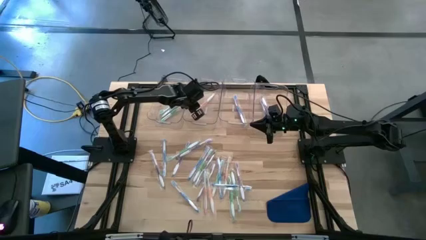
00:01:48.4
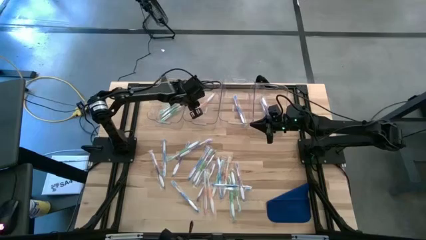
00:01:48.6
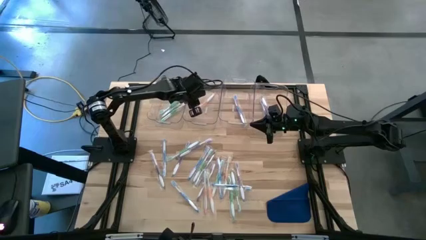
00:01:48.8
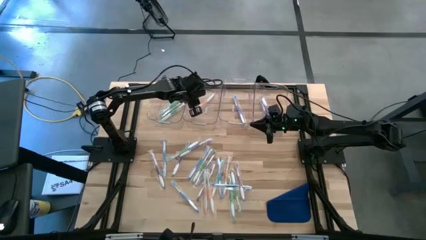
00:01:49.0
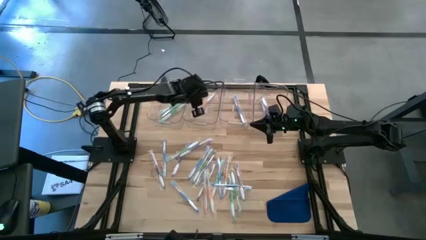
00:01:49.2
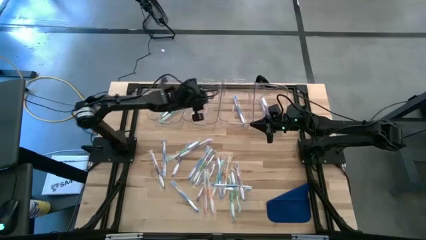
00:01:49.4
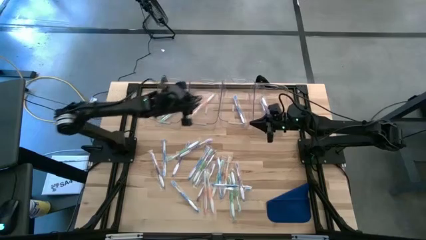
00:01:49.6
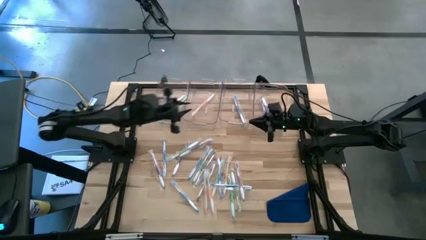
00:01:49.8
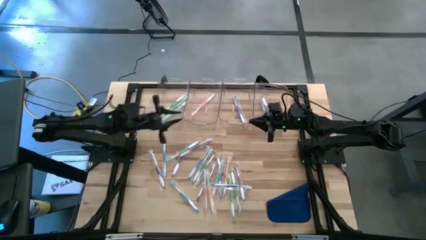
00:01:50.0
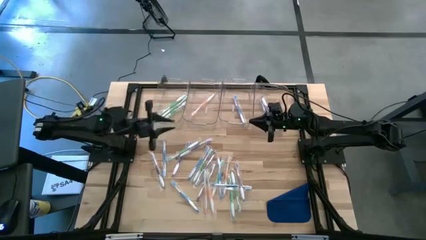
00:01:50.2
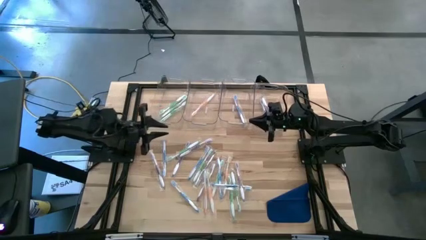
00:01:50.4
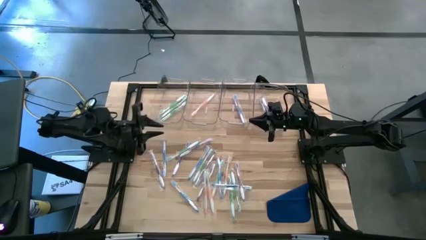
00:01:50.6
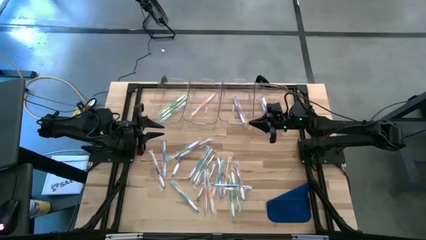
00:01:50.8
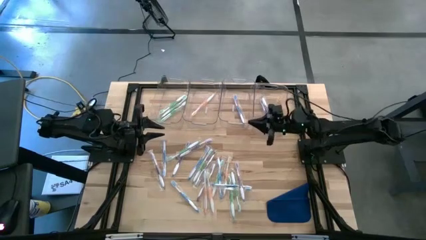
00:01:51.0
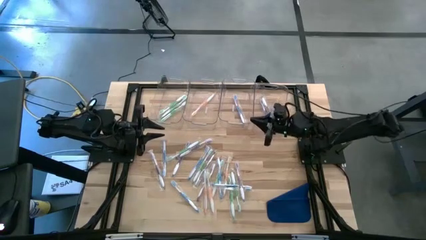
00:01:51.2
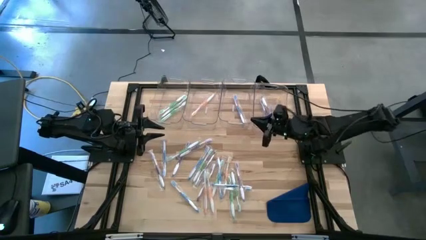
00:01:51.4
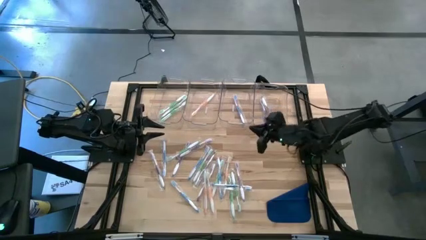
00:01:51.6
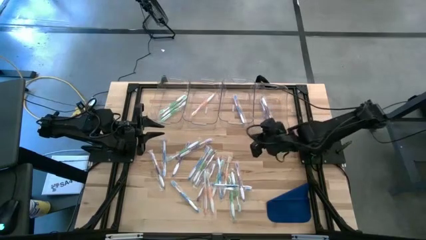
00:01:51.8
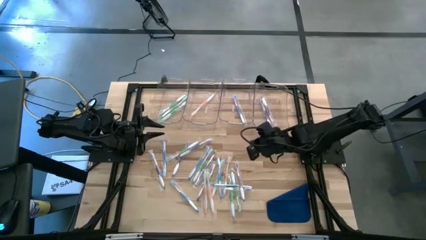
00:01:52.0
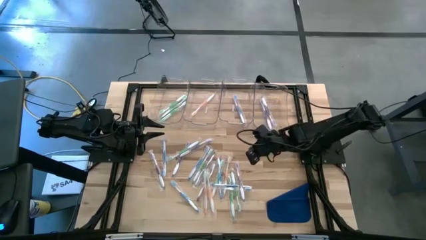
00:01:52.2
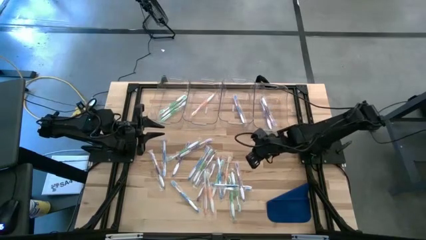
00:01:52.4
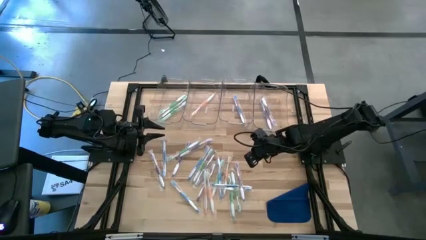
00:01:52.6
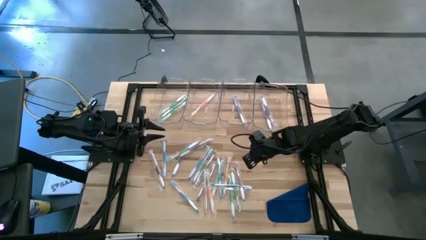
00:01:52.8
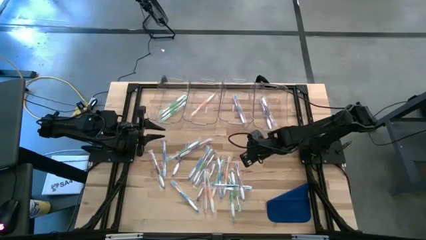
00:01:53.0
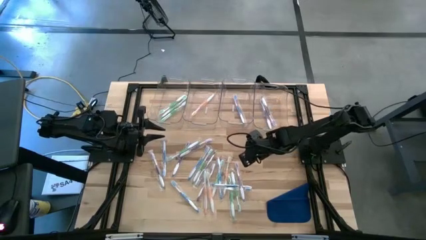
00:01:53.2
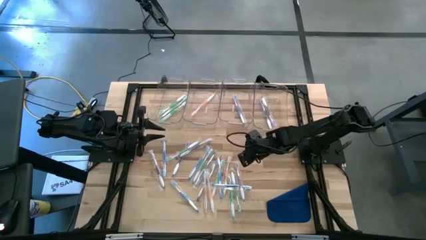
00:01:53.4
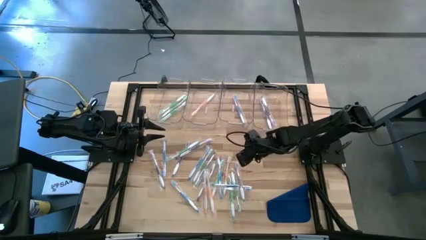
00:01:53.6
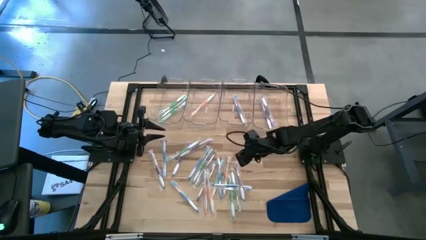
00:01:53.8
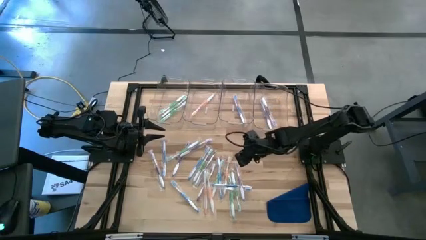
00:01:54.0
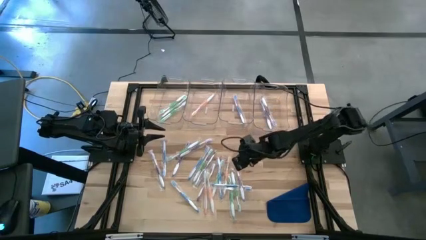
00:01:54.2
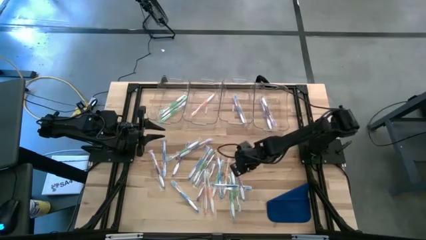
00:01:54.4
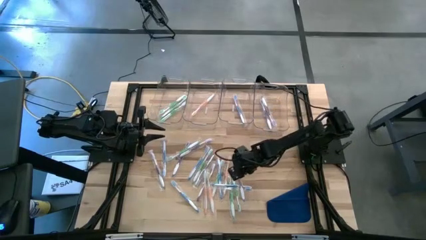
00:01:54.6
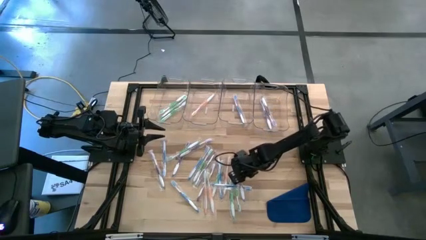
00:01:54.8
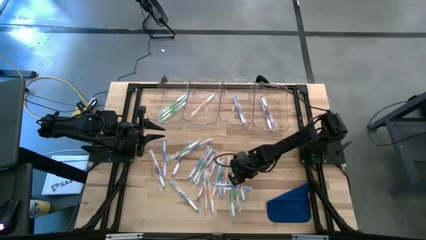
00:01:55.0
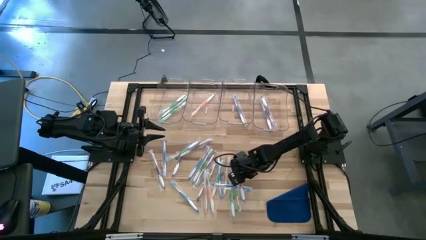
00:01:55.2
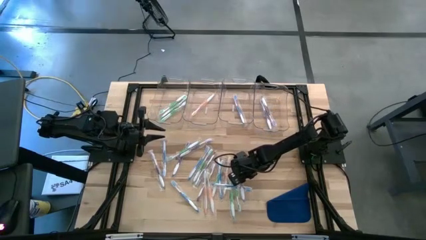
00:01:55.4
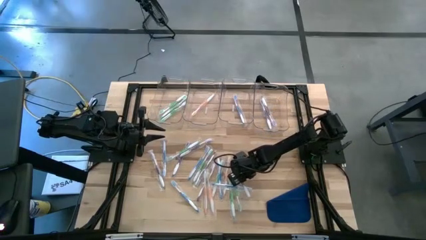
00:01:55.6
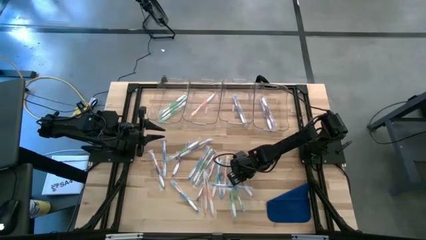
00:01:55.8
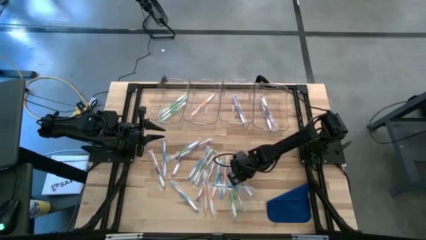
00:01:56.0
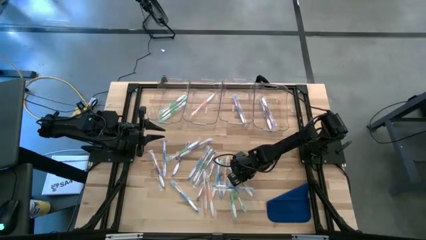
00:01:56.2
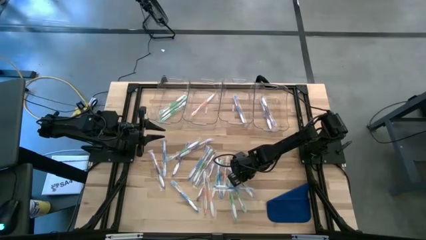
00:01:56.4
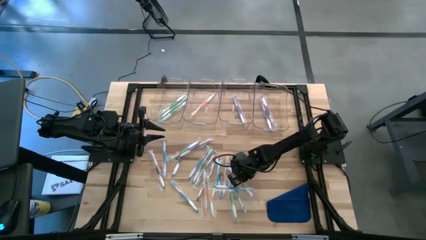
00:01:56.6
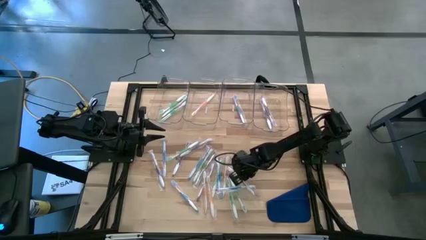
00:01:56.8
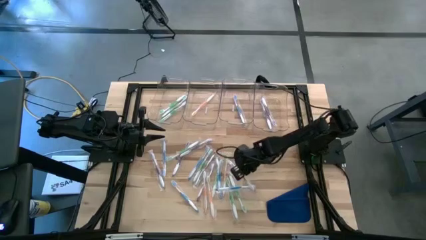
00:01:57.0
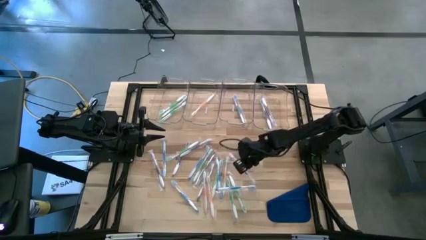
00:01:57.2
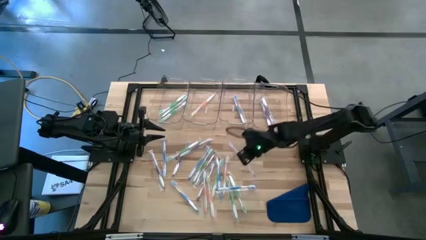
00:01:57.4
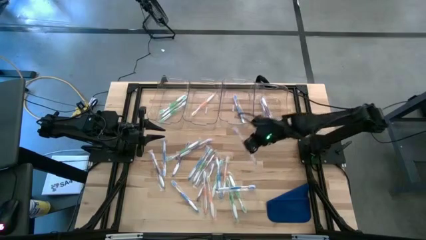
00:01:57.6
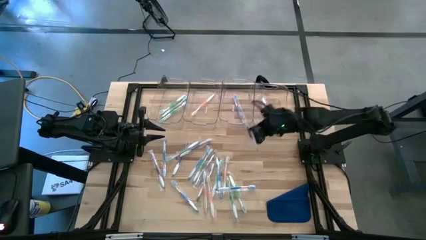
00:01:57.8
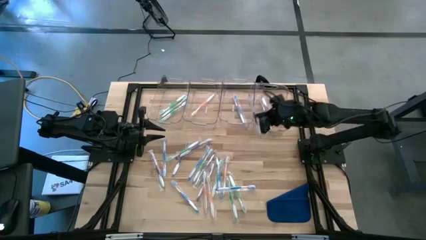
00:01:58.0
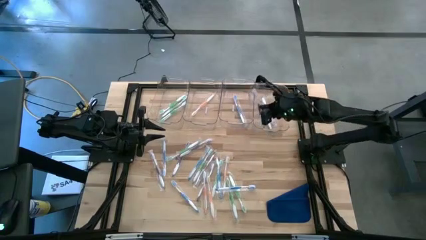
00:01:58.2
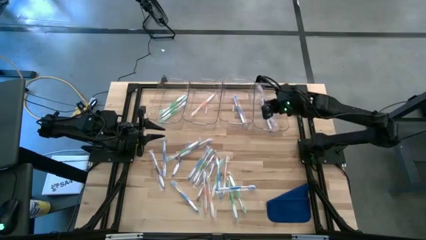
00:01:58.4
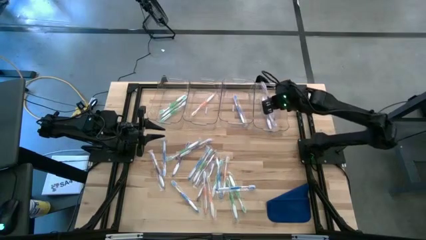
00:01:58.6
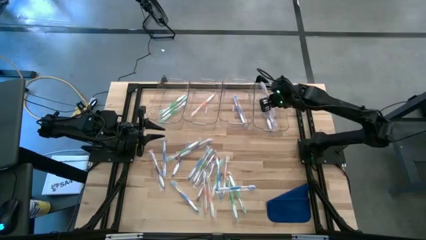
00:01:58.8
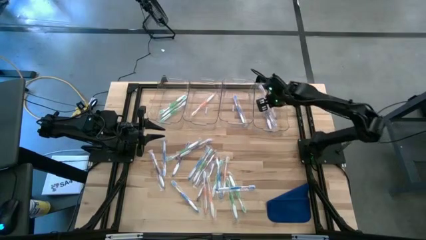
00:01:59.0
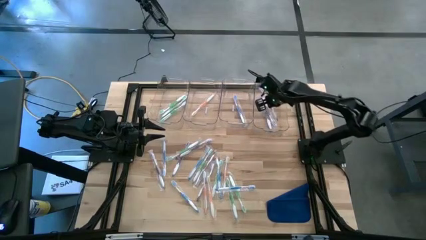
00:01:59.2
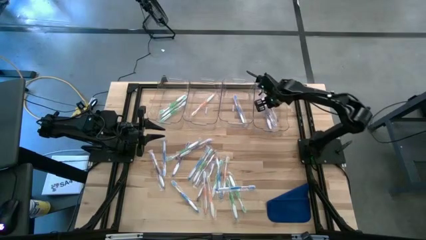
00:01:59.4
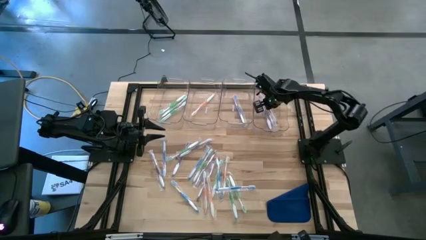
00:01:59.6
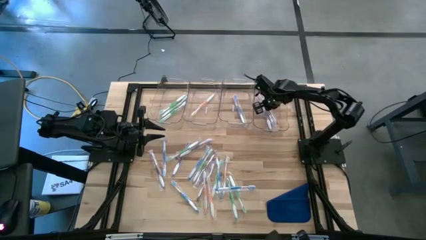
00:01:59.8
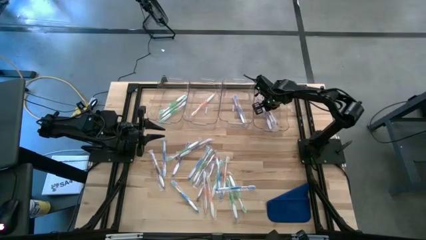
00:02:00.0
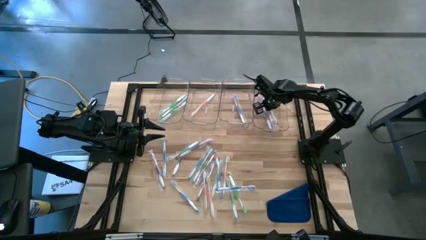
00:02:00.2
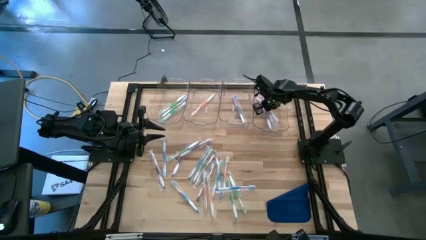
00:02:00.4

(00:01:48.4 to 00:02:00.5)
Task: Pick & Place Toothbrushes
Put the violet toothbrush into the right transparent bin

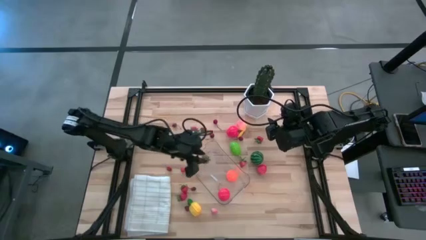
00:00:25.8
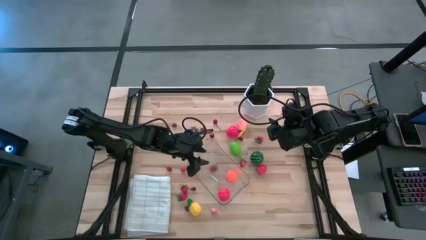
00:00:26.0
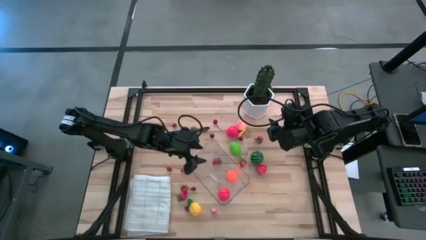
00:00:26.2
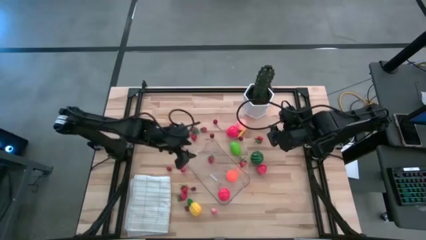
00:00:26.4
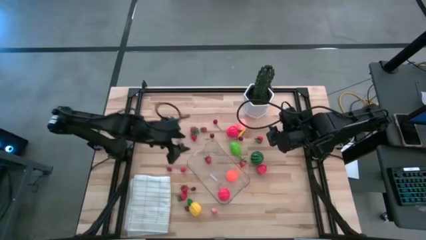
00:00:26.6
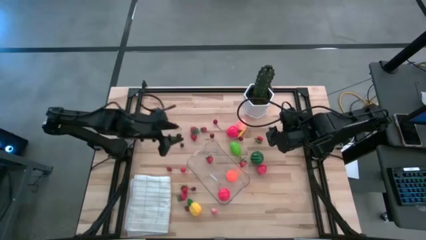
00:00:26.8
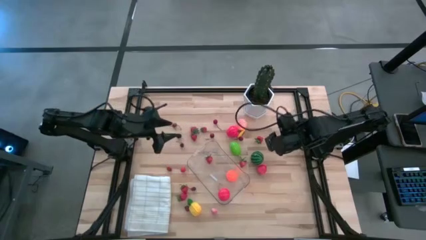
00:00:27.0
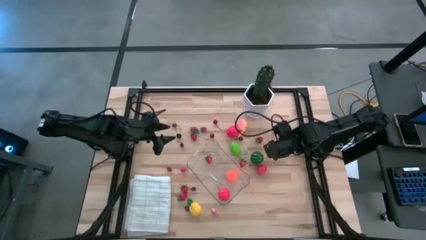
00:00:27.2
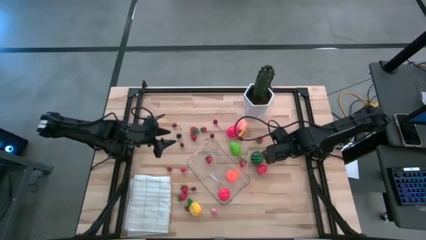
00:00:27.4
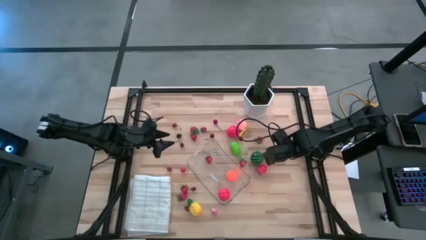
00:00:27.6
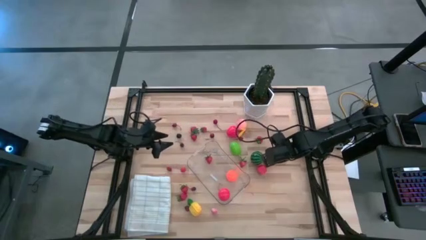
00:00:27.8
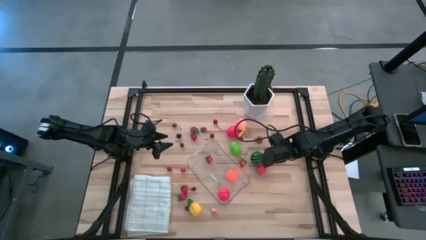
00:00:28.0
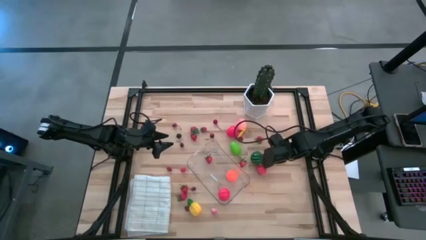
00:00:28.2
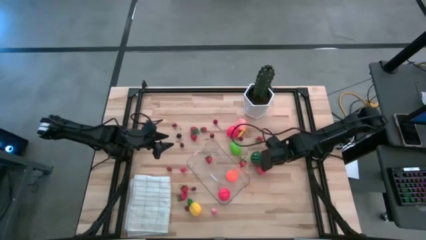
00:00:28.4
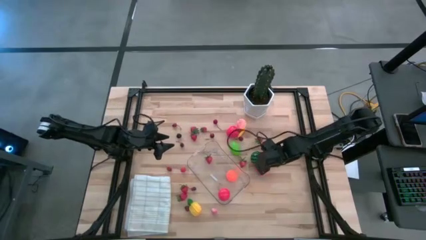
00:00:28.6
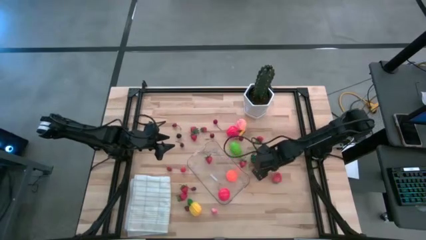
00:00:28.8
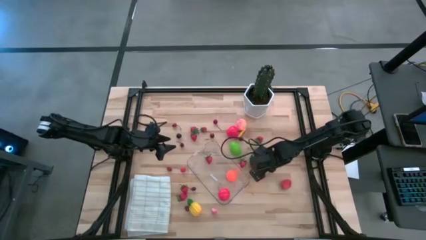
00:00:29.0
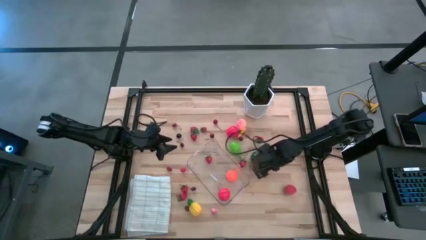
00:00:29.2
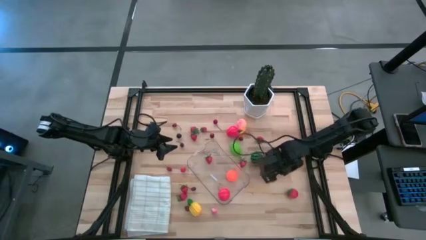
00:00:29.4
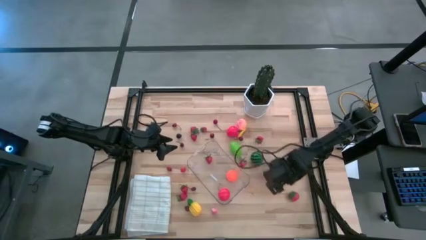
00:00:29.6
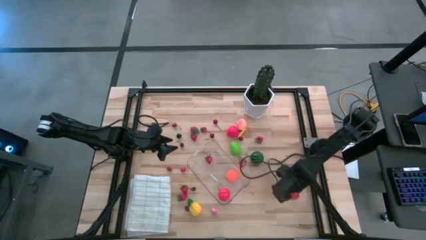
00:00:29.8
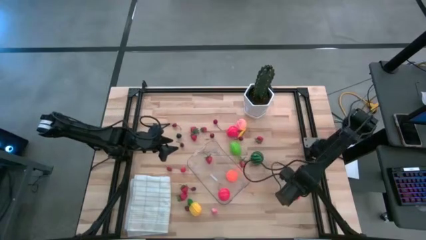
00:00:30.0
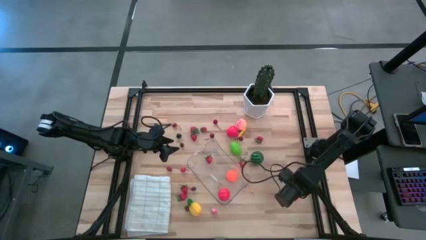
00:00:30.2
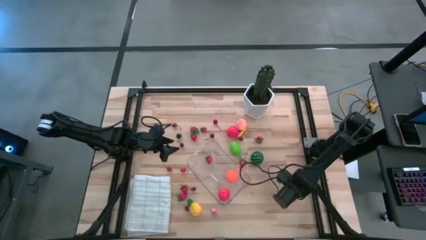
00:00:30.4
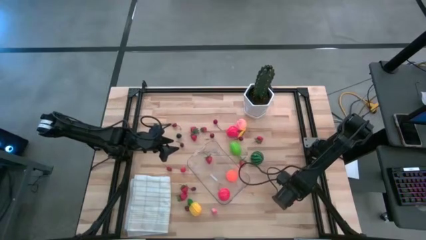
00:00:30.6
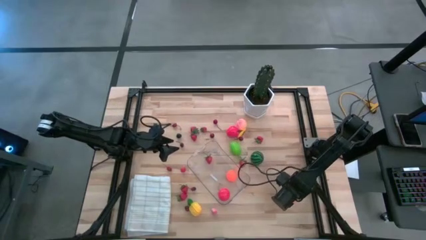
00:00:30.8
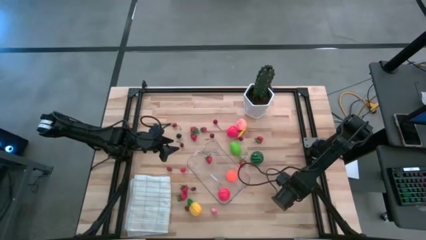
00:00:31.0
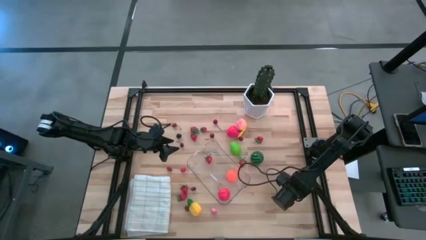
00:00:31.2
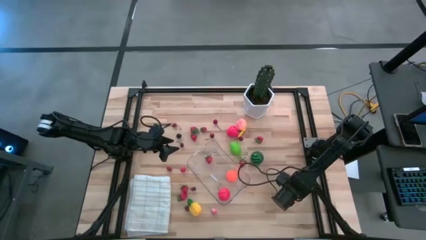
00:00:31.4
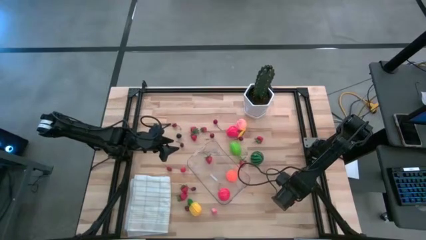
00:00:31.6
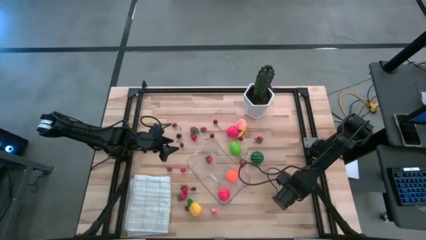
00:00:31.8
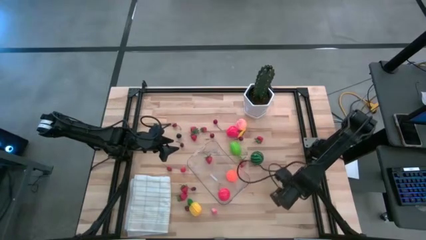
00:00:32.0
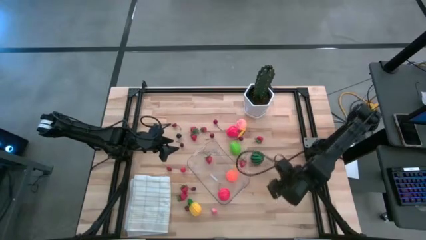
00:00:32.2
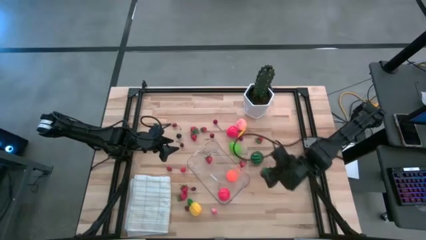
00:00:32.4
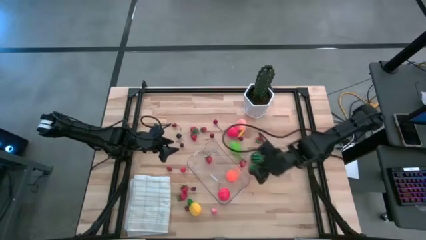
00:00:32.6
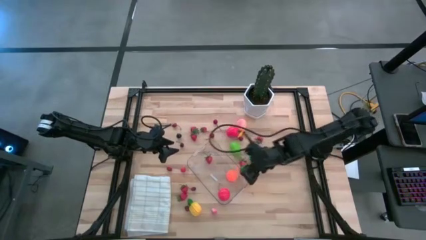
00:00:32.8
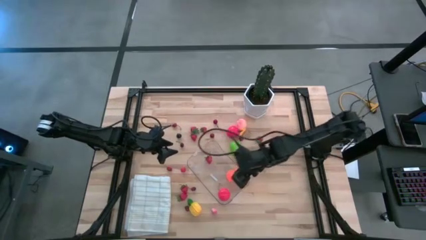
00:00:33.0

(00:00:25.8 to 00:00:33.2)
Task: Pick and placing Produce into tupperware
Put the red strawberry into the transparent bin
